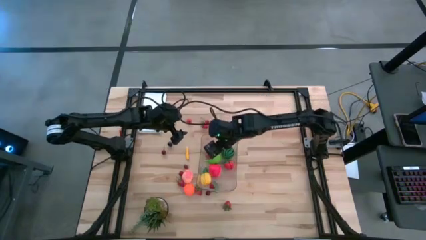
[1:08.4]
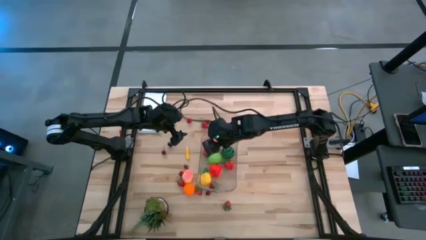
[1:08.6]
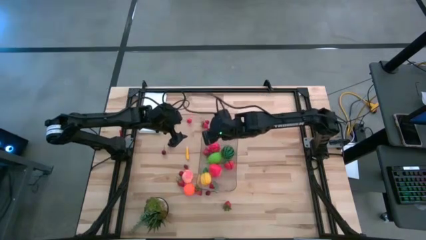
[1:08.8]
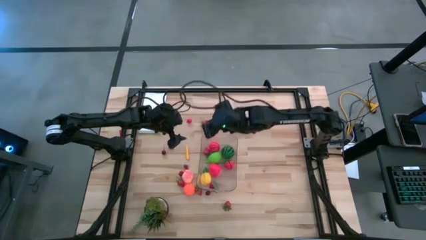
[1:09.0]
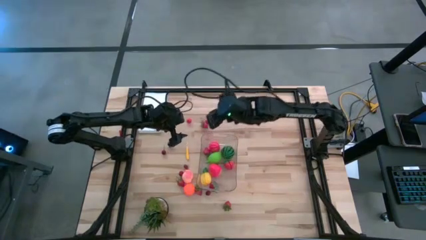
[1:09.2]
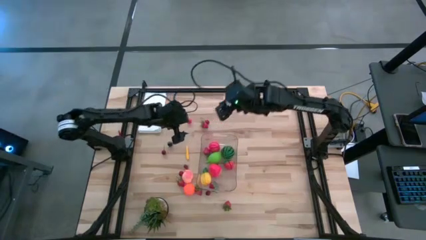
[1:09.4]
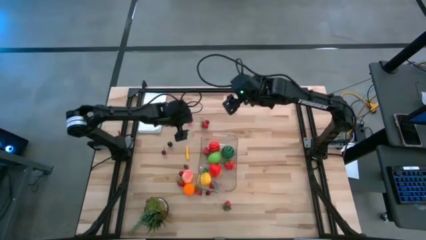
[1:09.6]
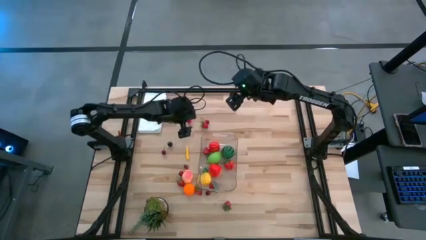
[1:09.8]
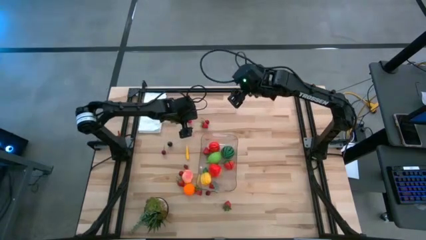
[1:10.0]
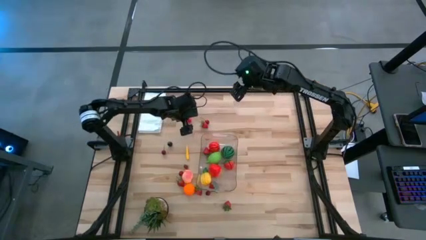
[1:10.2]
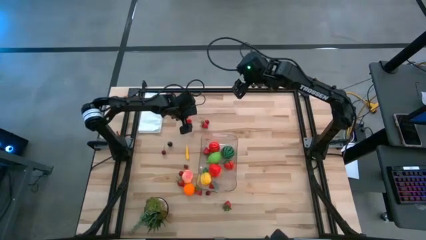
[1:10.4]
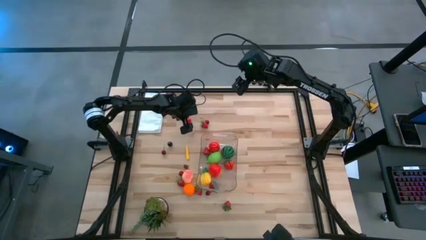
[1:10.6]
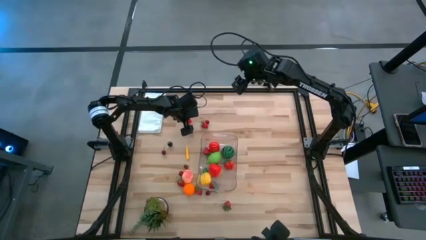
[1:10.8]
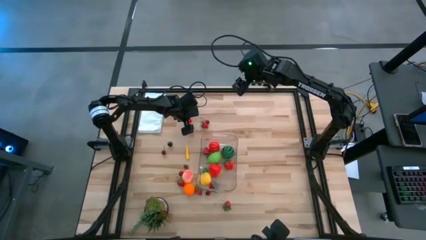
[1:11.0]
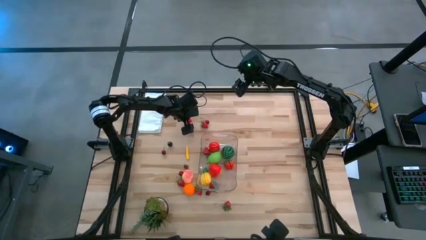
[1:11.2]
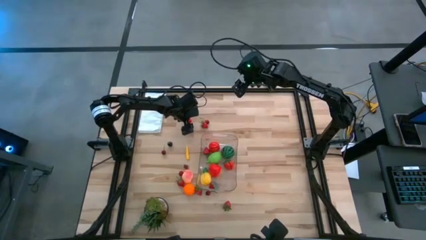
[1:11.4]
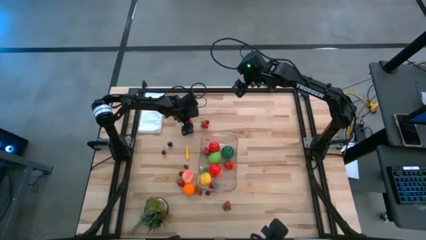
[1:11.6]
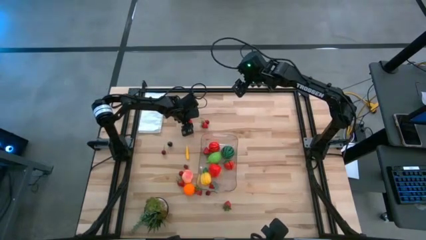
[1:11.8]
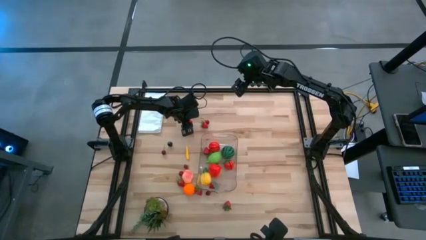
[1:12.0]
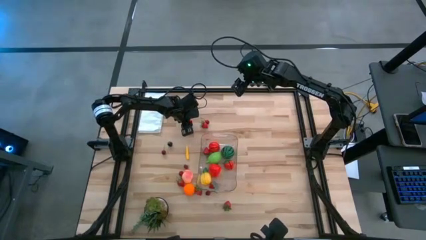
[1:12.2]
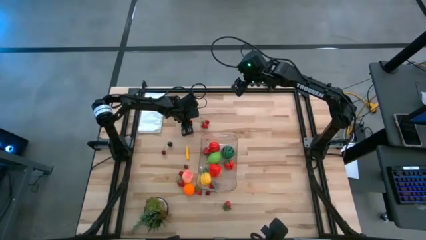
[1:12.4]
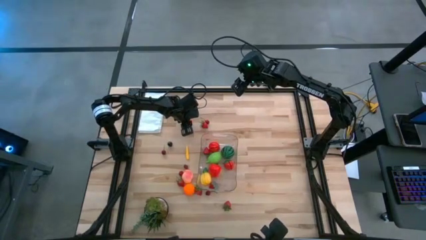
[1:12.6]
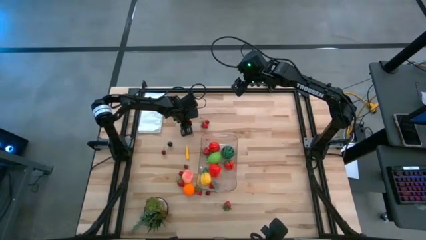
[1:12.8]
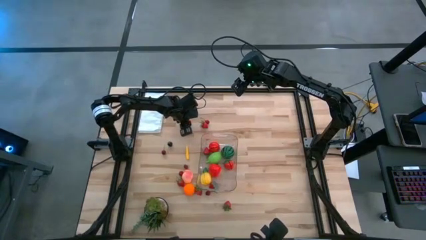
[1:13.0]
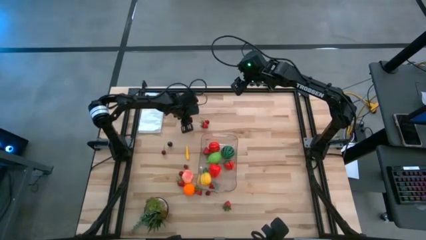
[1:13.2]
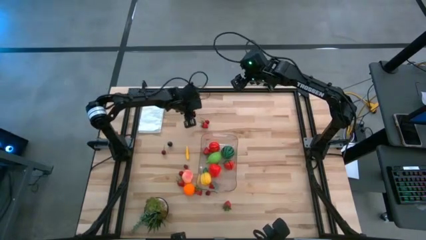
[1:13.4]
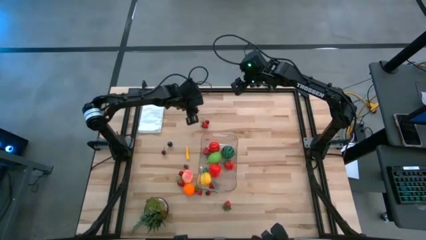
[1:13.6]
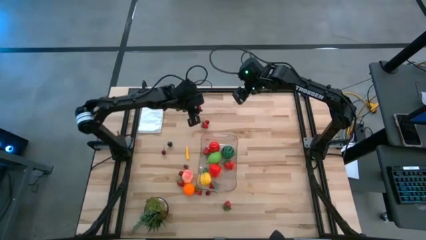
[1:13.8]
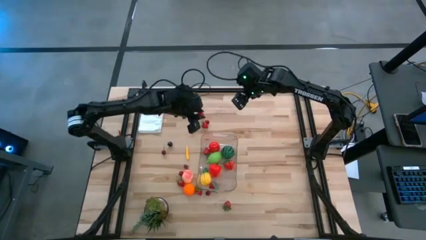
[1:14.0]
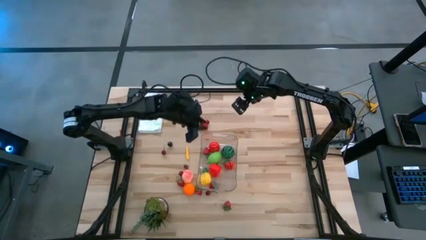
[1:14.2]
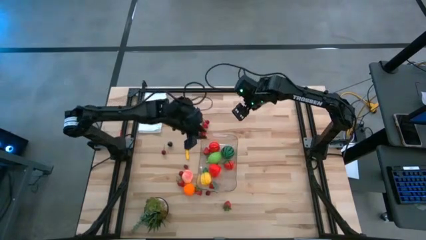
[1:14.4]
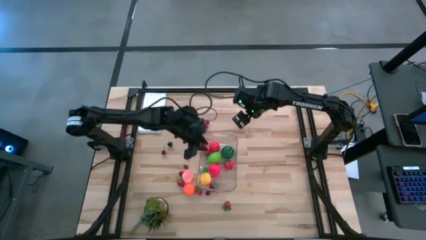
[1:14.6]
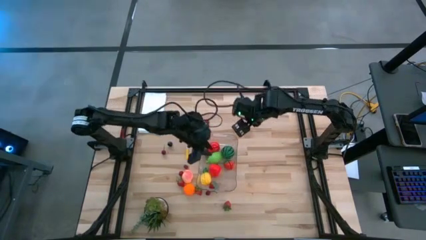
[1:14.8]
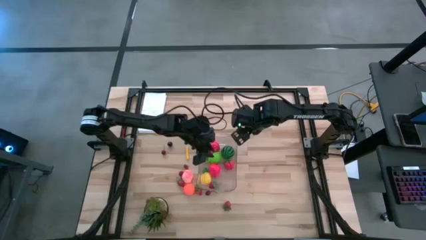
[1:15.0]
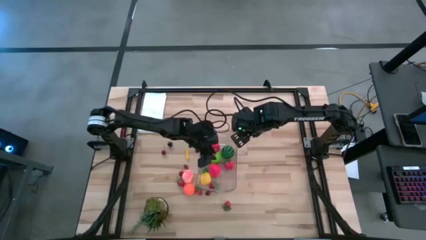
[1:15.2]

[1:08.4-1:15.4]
Task: Pick and placing Produce into tupperware
Put the red cherry into the transparent bin

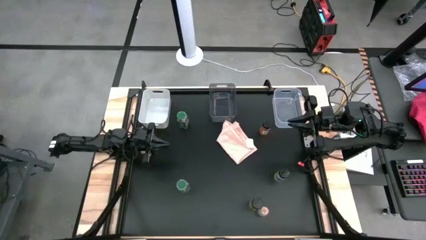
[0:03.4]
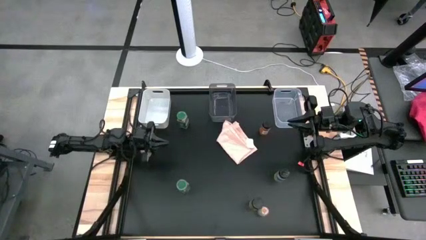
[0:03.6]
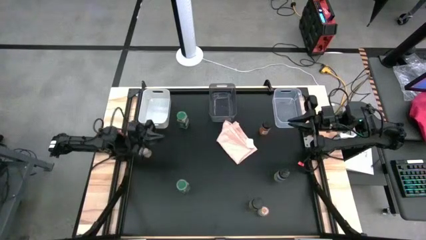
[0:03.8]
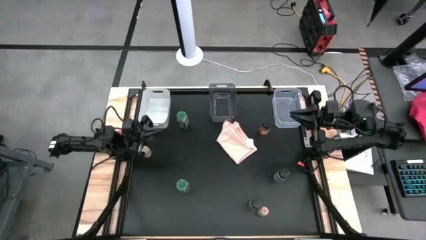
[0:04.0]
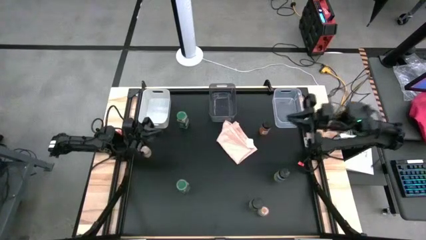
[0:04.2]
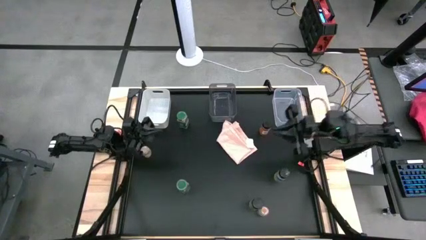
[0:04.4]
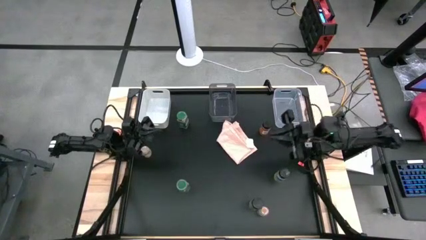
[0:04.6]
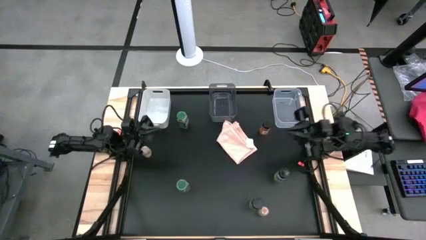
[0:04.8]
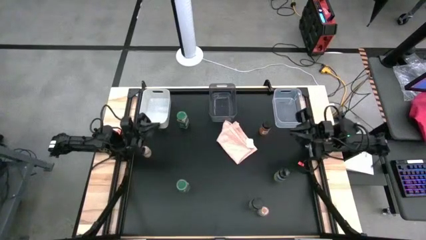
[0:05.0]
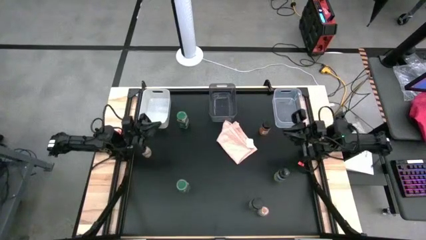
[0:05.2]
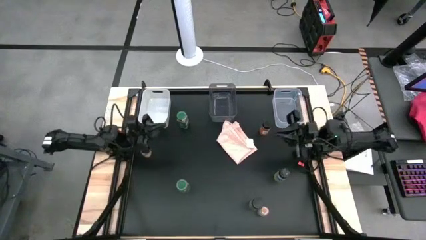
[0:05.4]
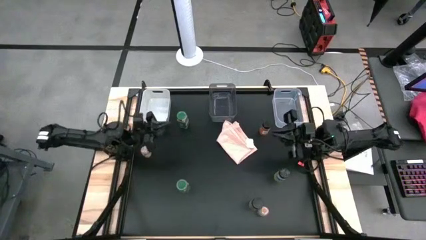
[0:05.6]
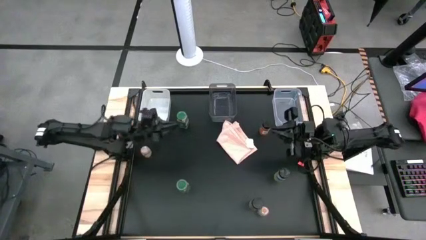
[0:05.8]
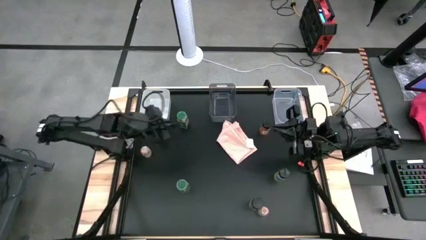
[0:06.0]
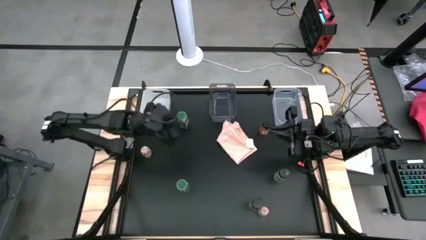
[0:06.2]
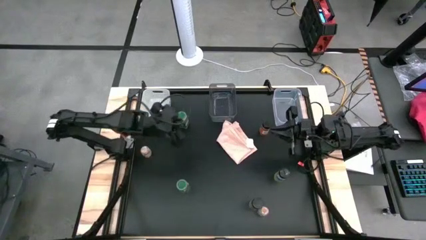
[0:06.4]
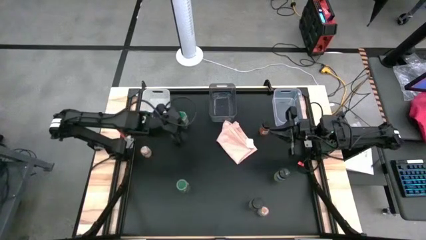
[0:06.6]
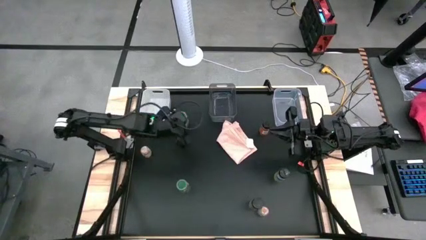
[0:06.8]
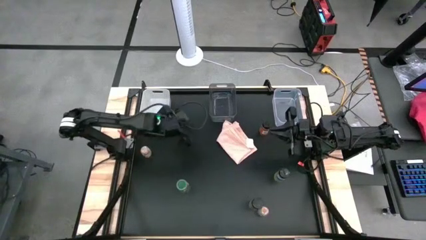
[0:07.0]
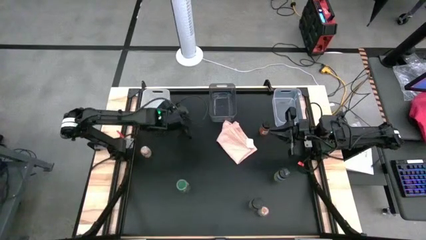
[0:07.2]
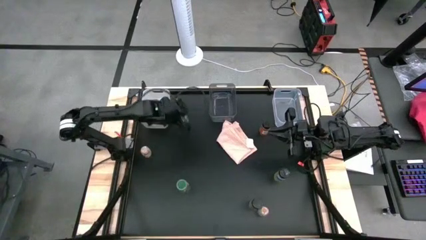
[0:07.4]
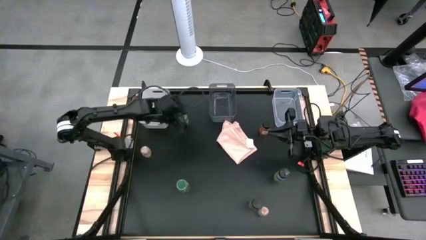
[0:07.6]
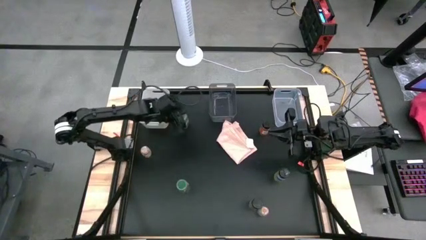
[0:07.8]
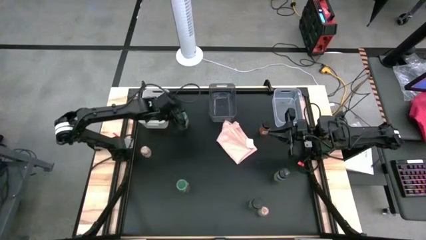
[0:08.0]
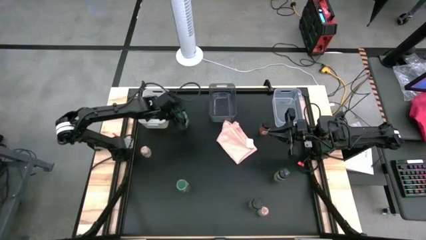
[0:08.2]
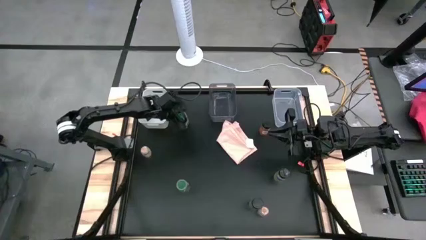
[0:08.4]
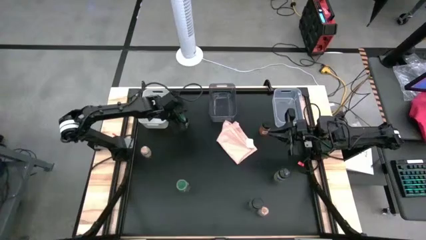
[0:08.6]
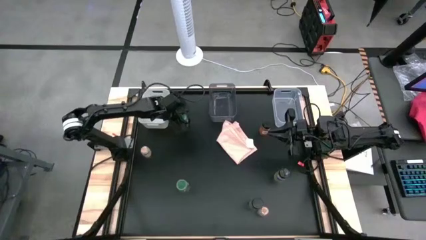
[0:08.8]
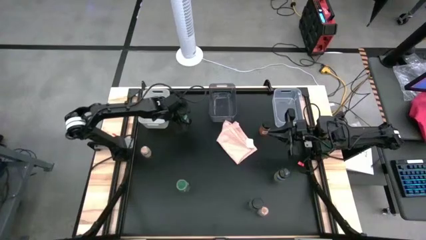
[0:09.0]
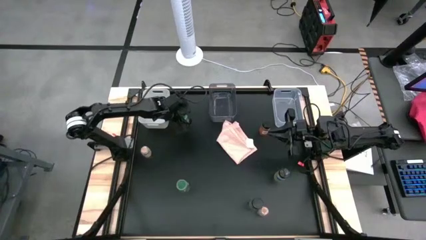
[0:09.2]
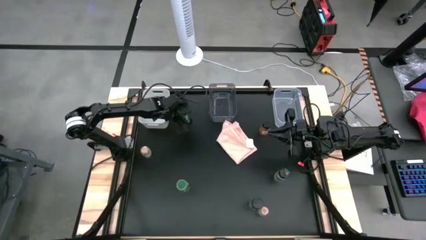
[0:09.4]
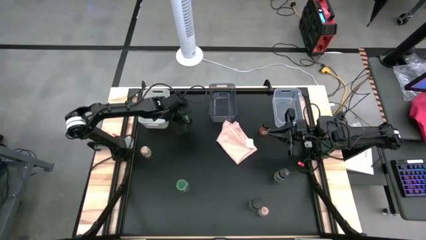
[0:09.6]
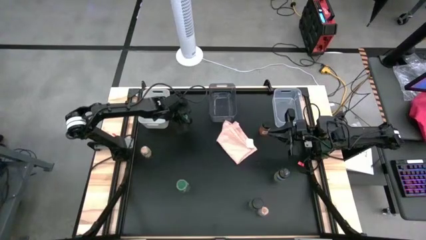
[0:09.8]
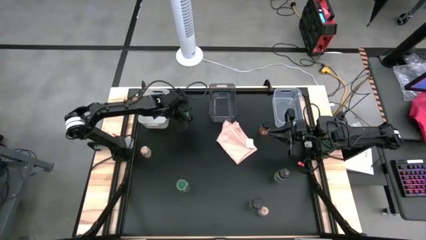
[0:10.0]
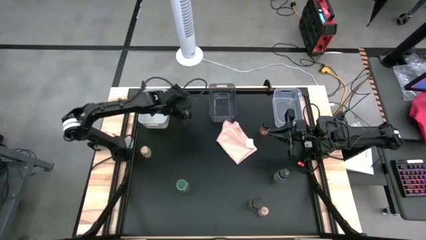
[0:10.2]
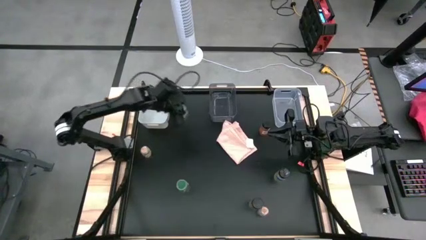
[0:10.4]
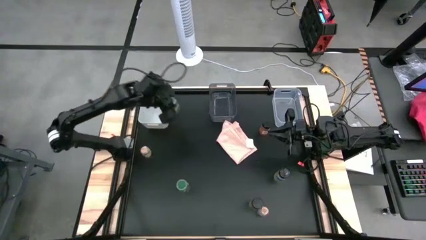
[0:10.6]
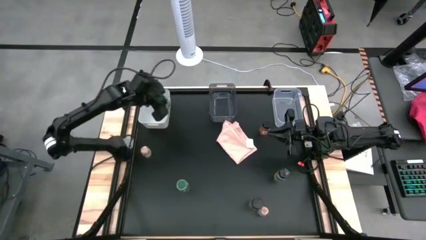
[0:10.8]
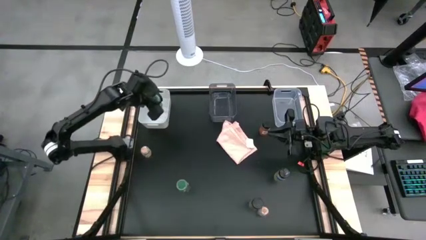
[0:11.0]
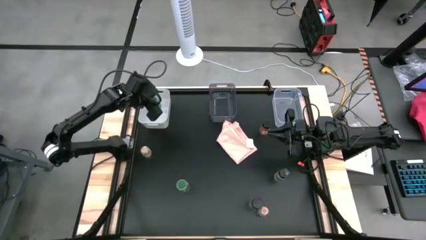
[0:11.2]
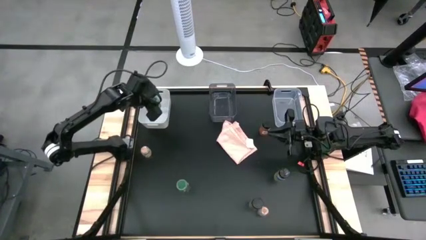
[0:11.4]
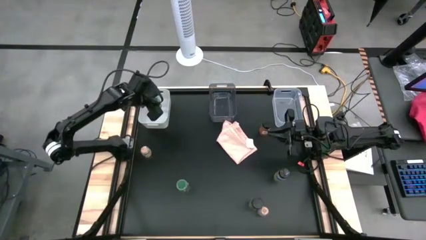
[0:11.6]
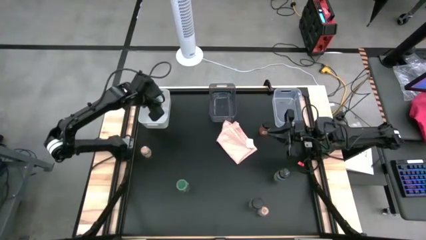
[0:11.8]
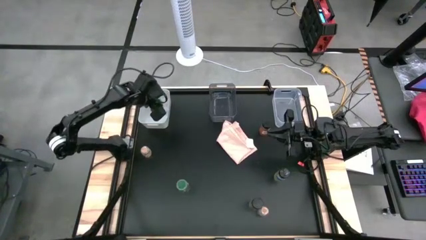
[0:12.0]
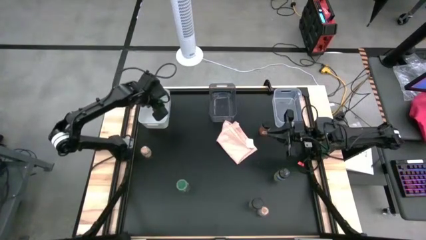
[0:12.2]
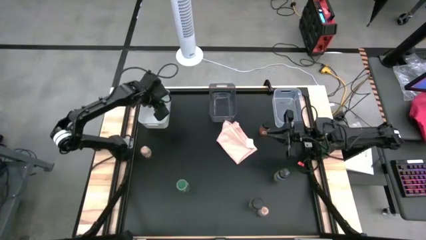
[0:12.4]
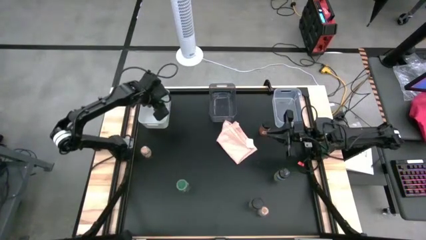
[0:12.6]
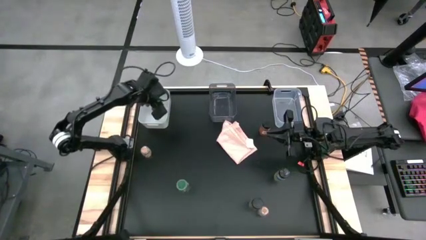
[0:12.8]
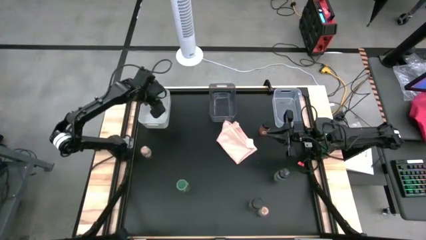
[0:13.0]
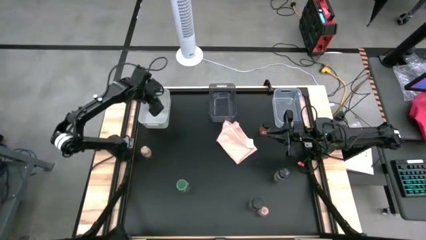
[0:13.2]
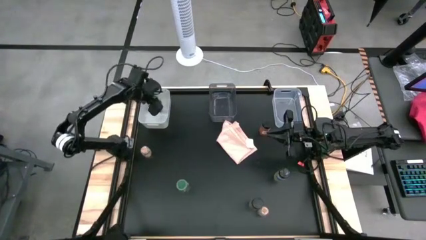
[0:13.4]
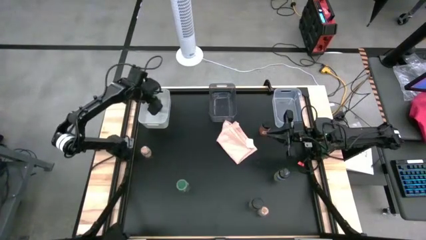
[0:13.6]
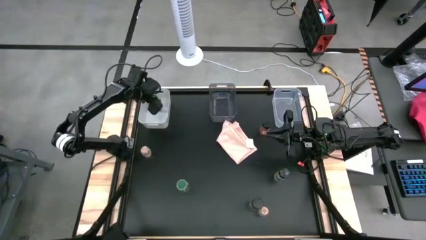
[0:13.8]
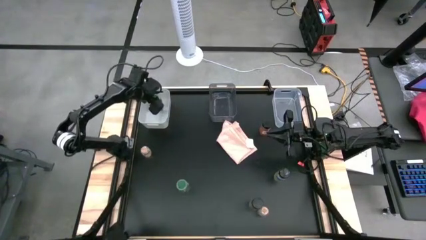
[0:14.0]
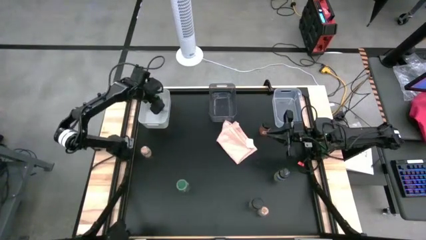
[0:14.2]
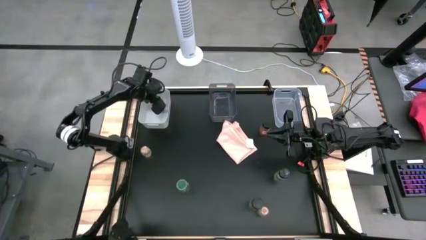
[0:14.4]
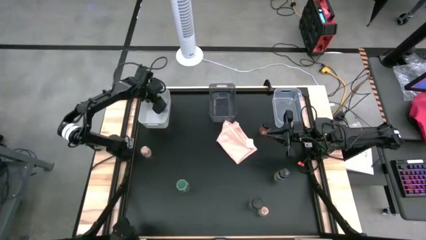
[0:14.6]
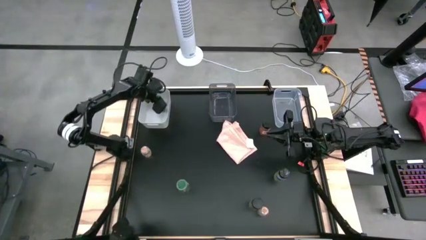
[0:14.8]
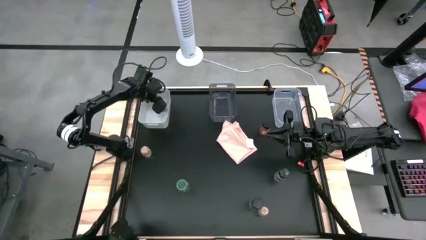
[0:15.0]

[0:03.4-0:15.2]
Task: Sort spices by type
Put the top green seasoning bottle into the white bin
